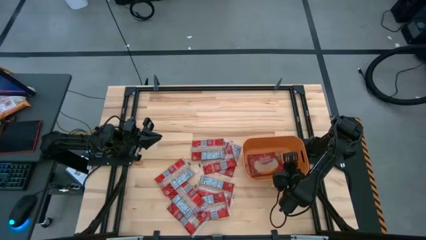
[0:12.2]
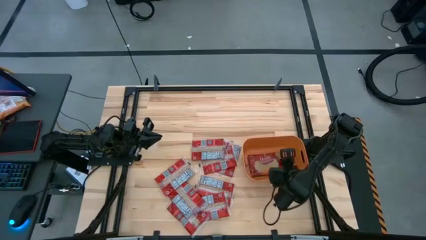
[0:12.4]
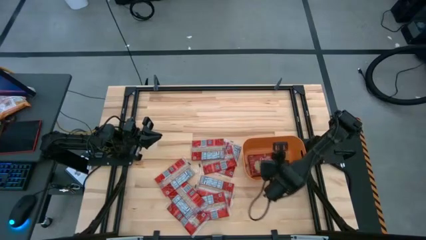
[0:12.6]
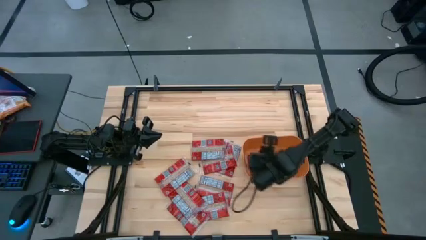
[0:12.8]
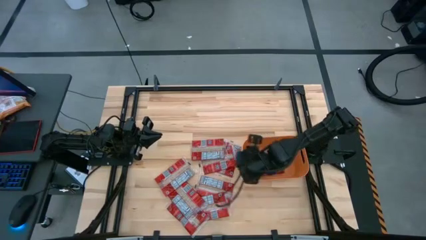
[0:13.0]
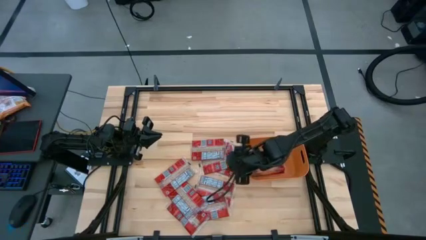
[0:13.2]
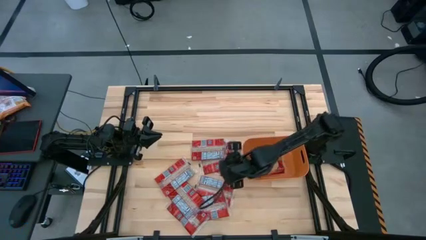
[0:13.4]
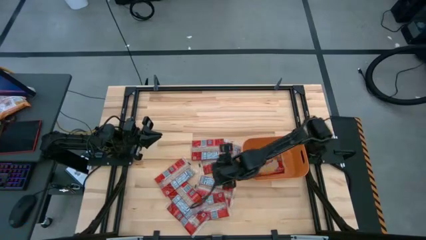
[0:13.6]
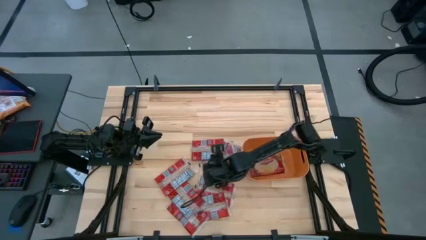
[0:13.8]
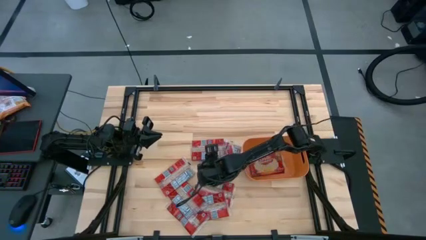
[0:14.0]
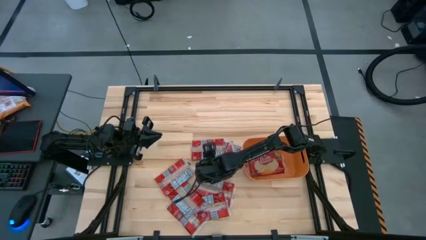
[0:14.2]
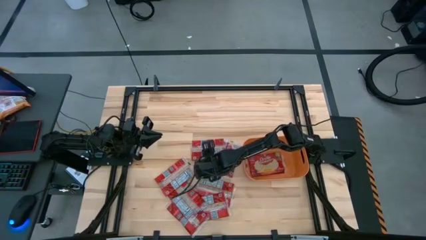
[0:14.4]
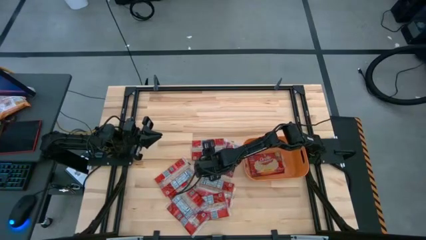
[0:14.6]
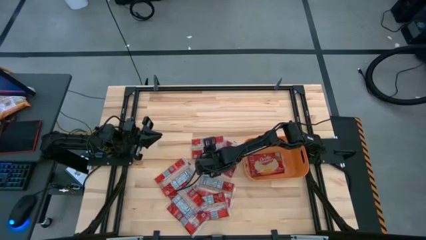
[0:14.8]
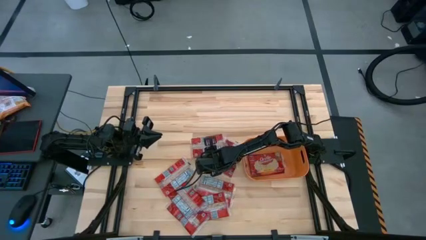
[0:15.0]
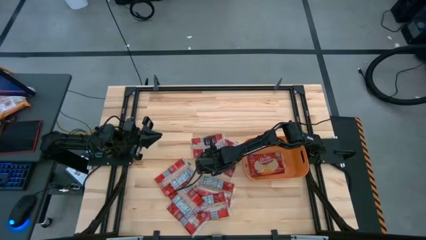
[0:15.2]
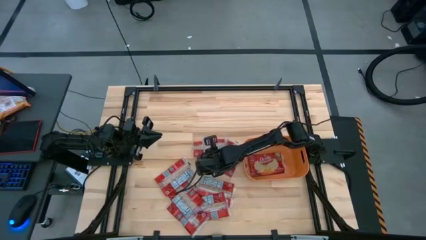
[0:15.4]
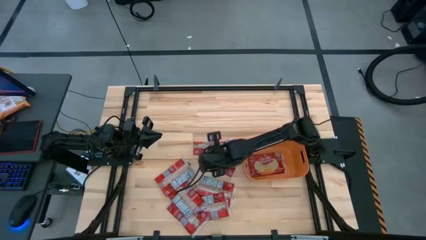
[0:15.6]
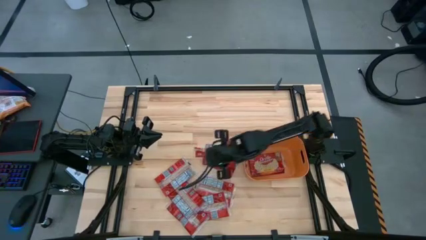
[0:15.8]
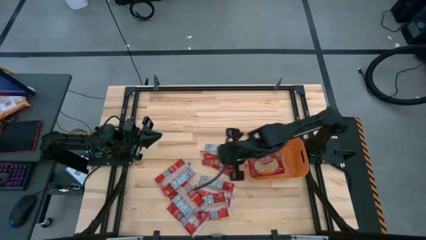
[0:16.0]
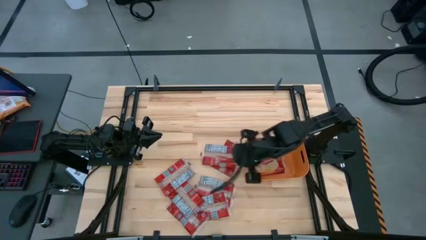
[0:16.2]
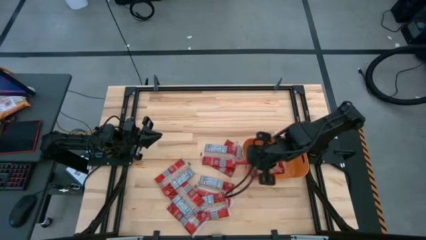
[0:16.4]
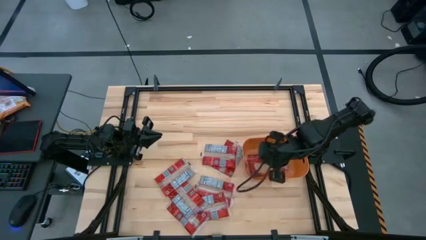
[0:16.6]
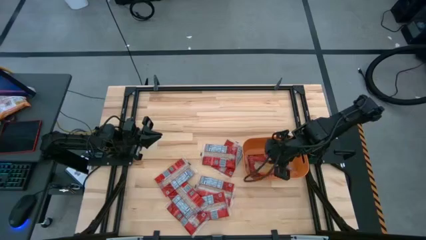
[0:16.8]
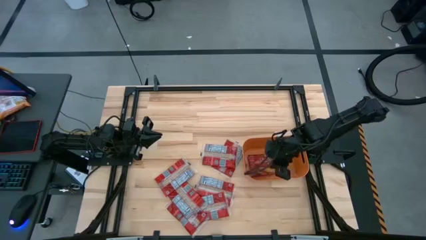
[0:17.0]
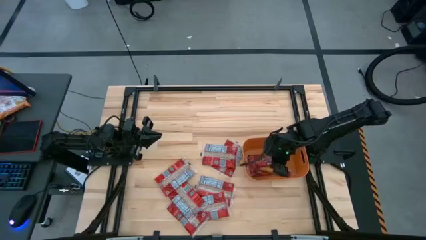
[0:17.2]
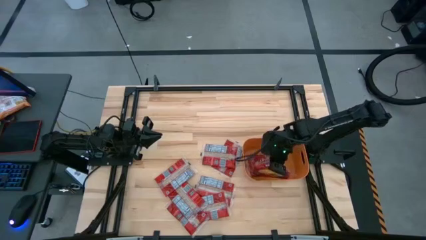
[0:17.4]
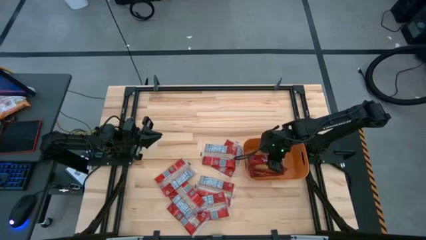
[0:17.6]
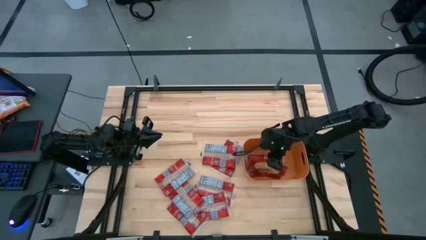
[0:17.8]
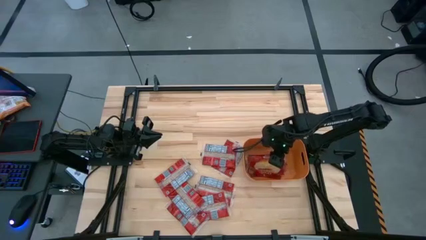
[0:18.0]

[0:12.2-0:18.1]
Task: Sort popcorn bags into baskets
Put the popcorn bag into the orange bin

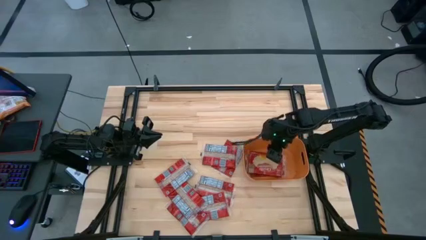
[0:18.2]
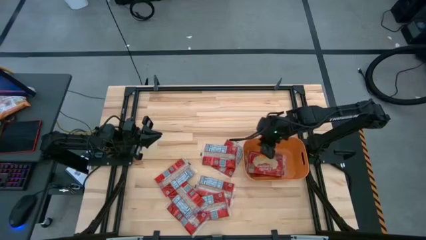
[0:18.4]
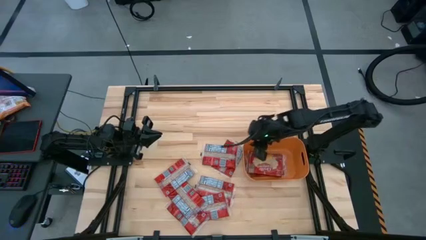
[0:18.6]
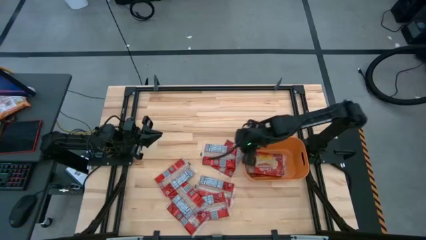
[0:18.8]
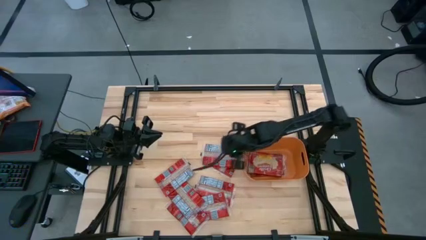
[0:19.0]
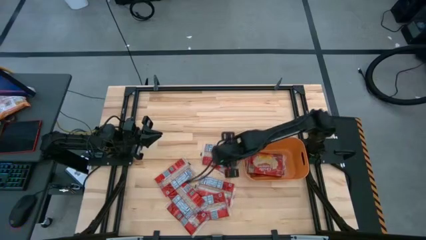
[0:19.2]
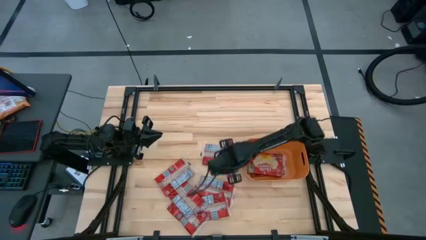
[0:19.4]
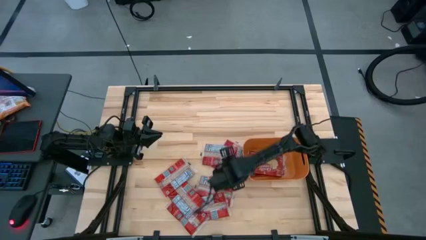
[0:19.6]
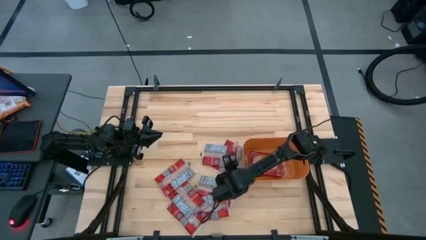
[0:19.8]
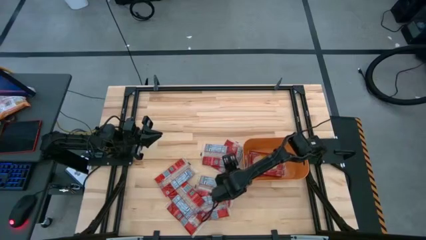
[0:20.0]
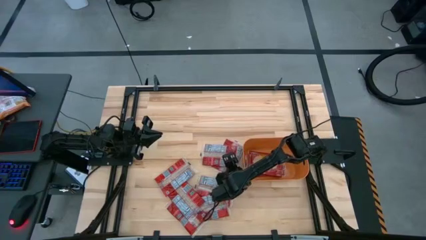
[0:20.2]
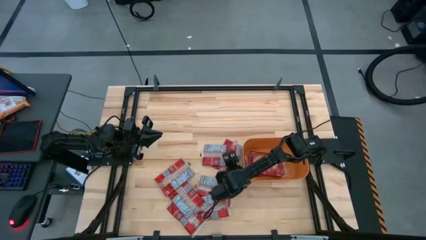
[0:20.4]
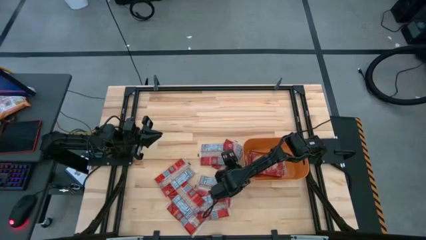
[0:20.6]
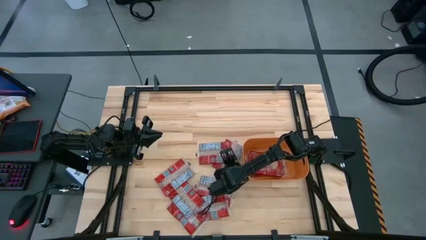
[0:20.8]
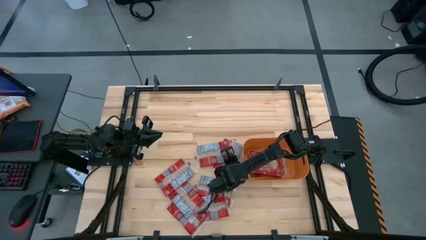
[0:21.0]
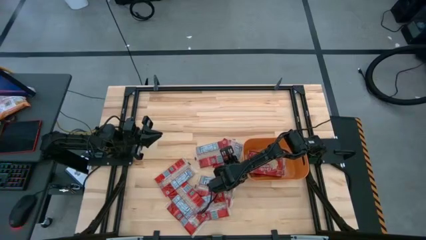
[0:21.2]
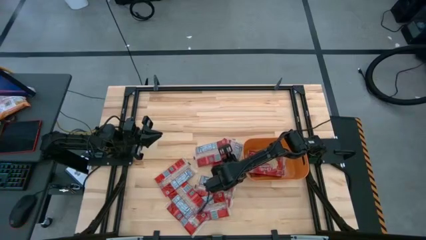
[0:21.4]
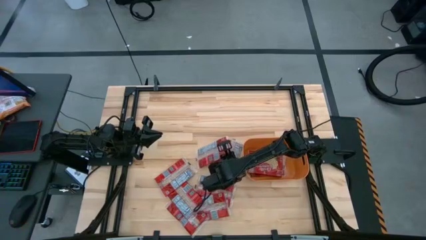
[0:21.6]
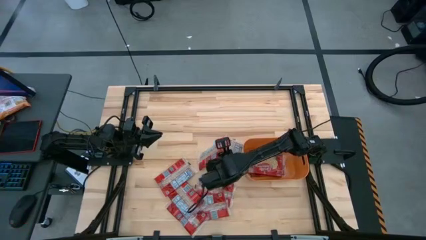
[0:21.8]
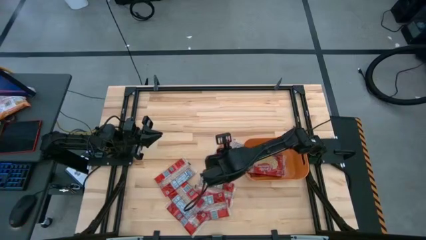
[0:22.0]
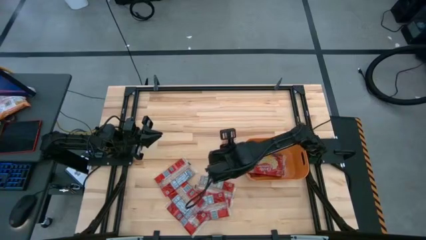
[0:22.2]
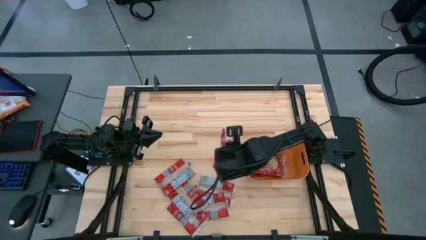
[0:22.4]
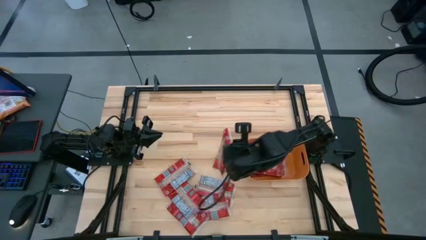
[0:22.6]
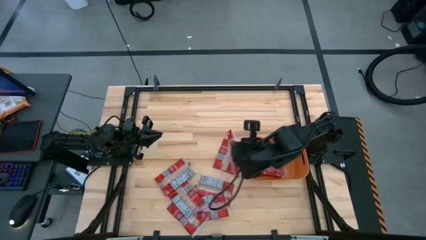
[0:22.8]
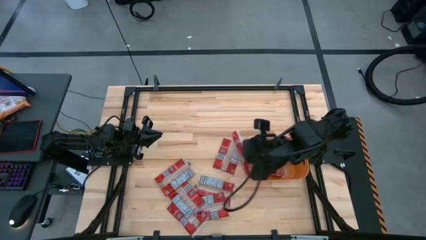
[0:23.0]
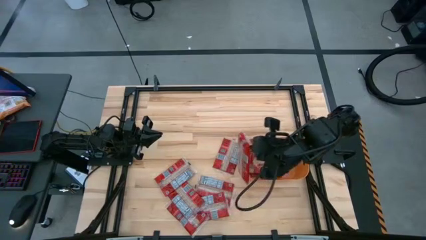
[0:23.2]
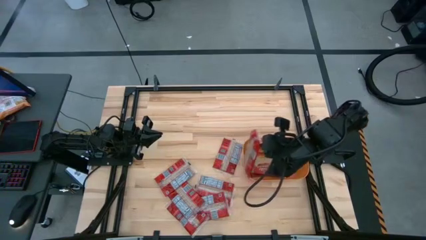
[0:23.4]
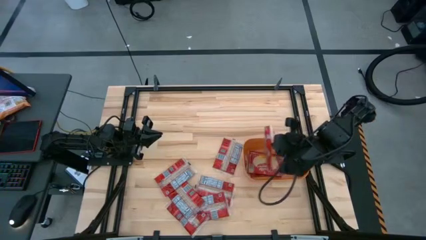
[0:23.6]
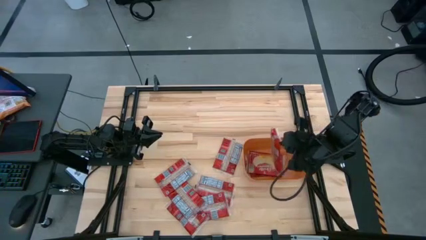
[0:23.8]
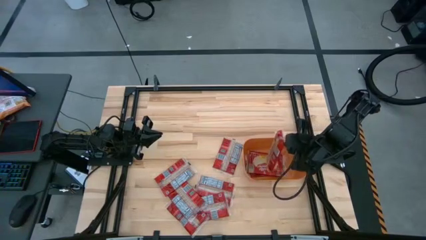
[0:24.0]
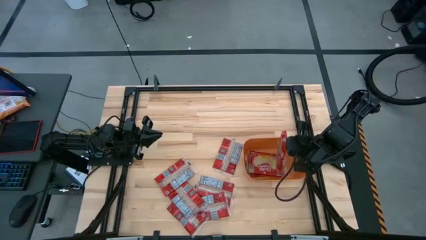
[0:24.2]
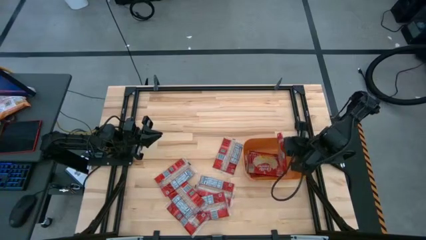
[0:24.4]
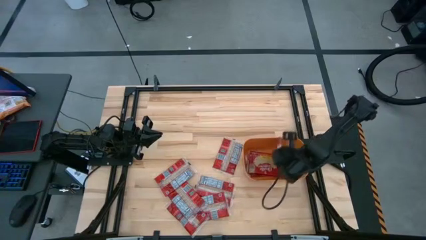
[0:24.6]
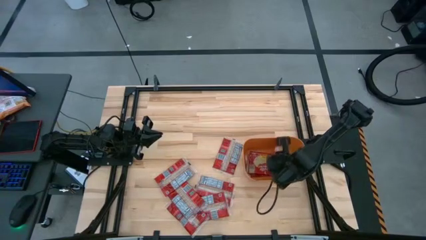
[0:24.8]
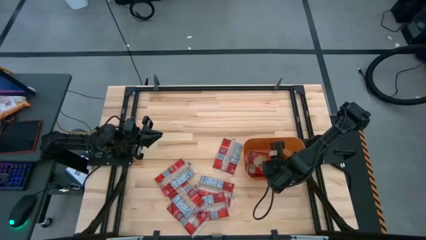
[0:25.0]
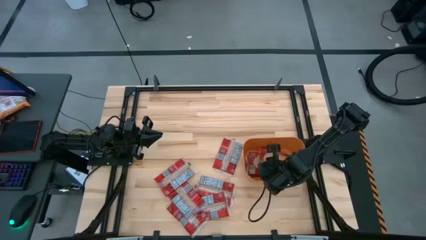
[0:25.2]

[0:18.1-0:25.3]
Put the popcorn bag into the orange bin

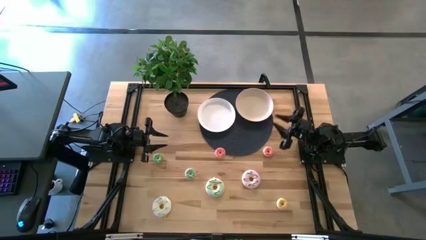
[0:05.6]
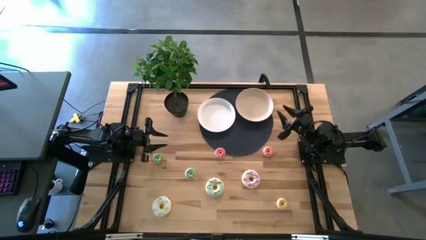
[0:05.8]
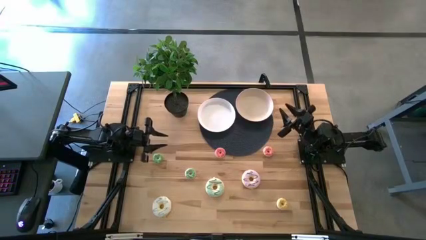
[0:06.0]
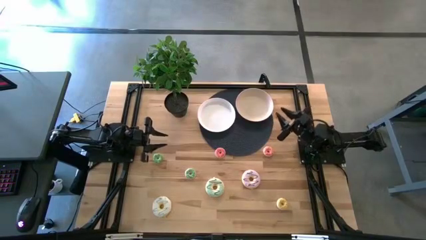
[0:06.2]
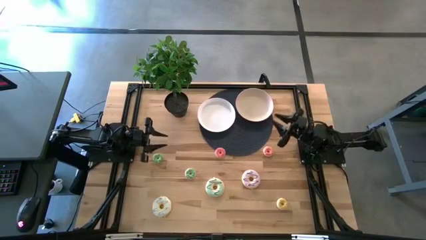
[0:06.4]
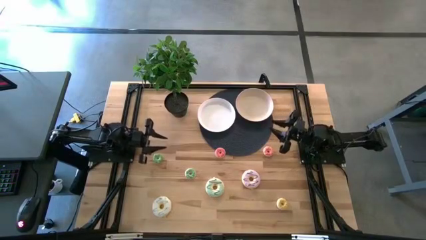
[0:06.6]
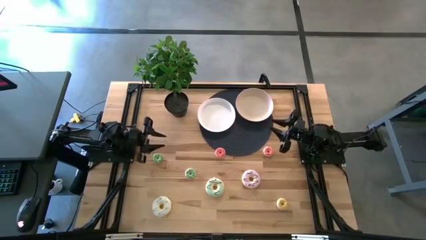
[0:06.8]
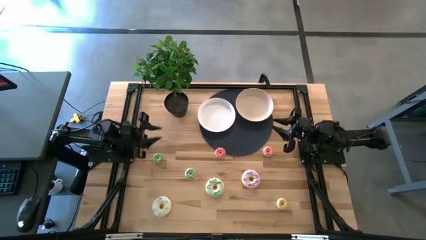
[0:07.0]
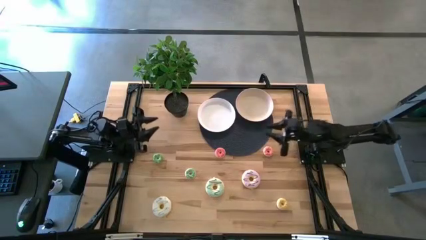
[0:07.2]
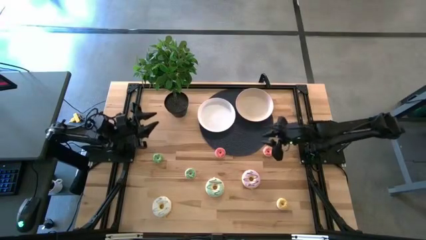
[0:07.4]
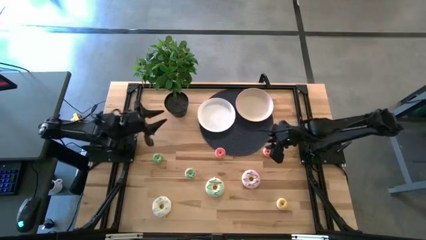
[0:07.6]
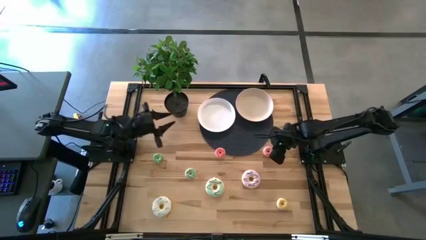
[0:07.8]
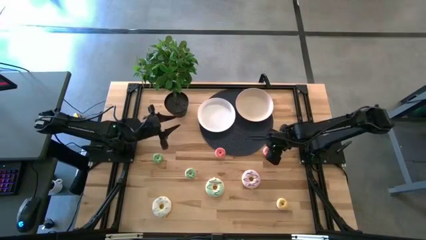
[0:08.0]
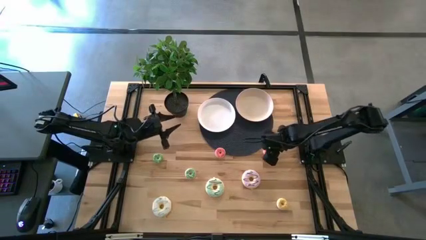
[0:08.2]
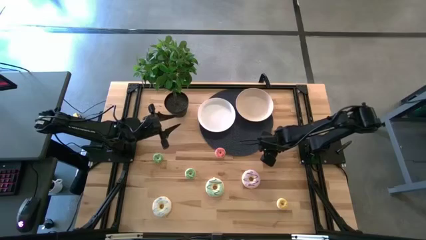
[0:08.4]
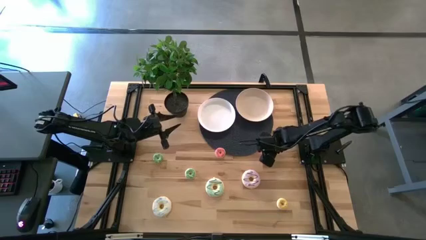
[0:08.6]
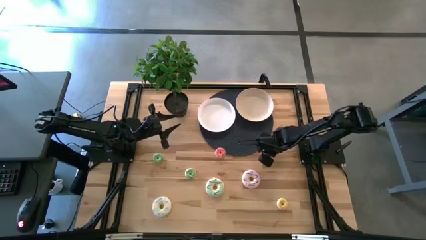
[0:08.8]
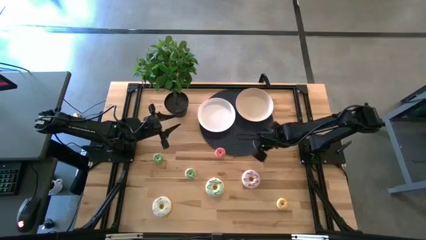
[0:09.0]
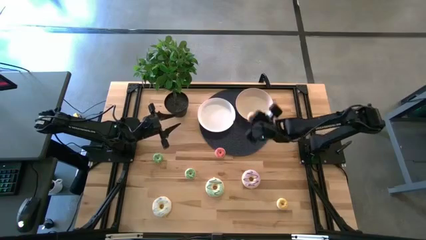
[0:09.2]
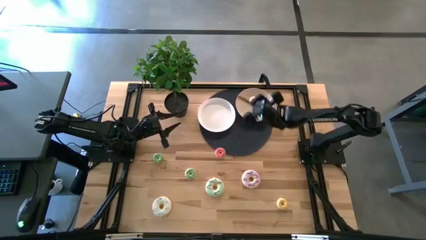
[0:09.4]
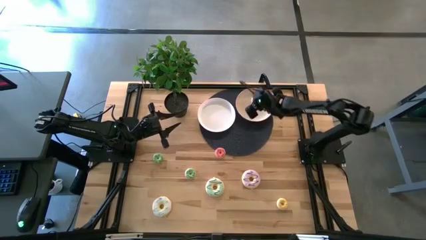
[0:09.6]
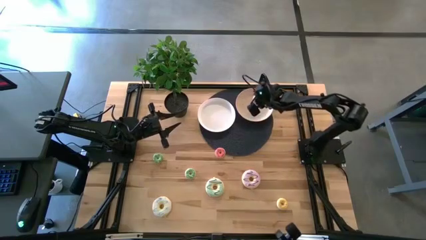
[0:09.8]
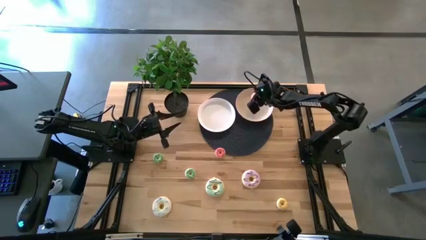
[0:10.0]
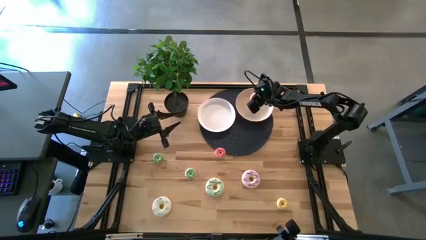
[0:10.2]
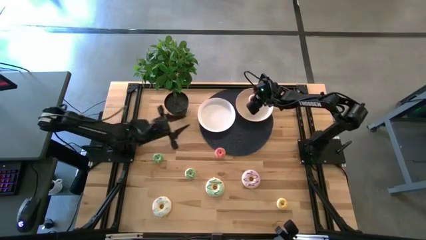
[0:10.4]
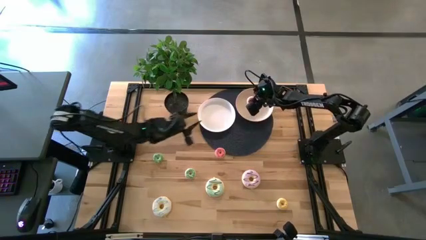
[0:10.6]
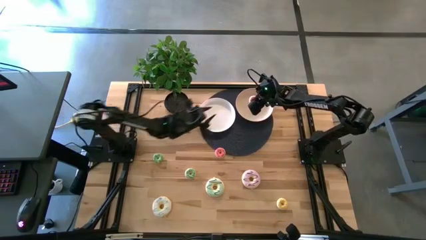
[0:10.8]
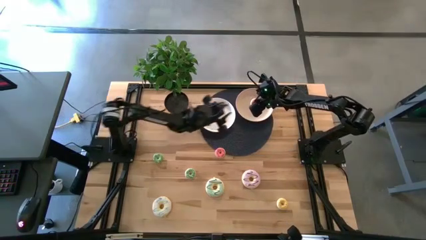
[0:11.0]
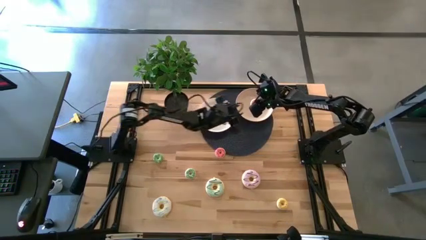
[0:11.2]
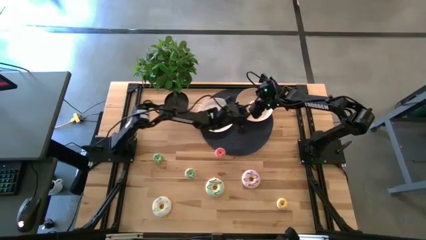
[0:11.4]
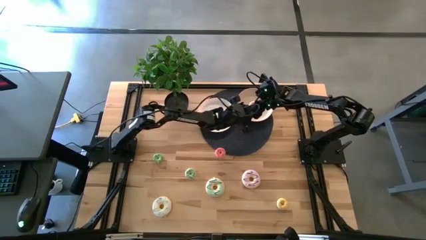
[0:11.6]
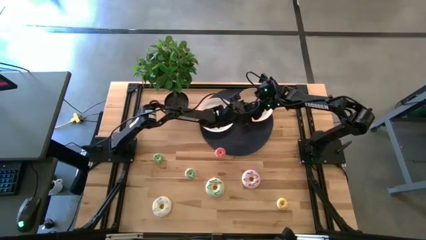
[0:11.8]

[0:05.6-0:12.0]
Task: Pick & Place donuts
Put the right small pink donut on the brown plate
